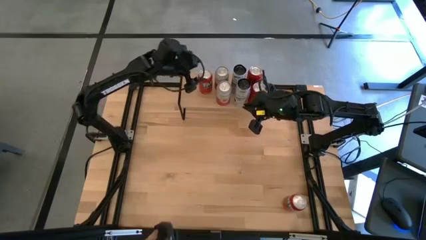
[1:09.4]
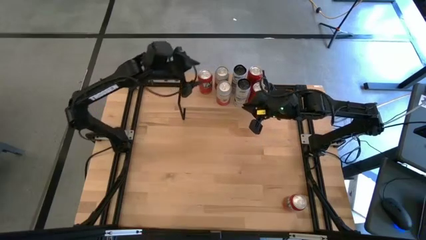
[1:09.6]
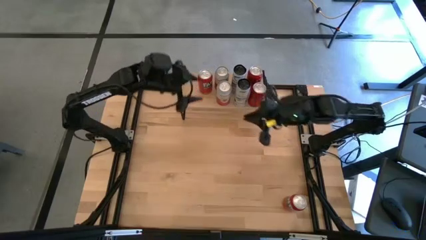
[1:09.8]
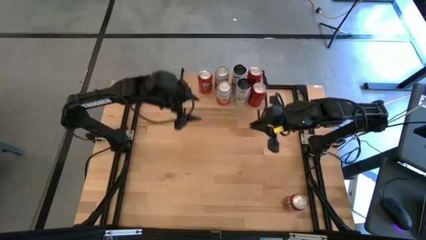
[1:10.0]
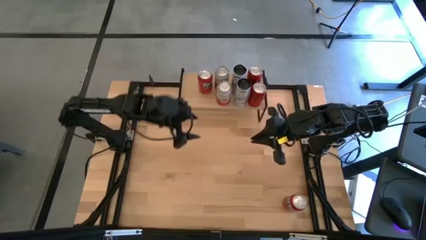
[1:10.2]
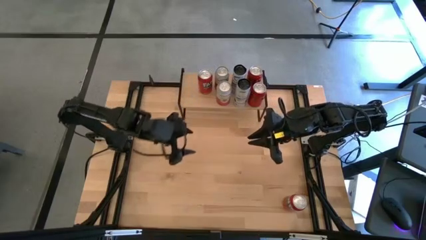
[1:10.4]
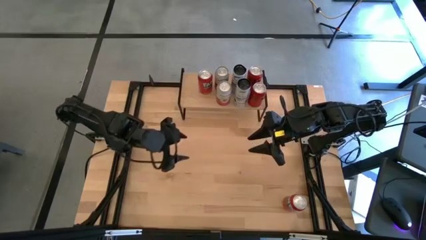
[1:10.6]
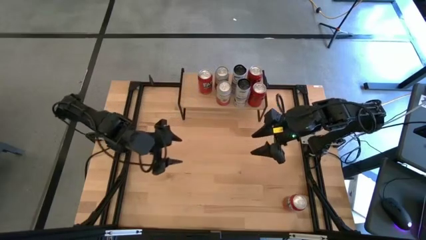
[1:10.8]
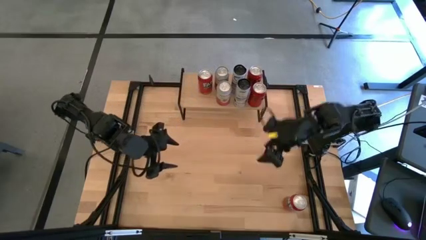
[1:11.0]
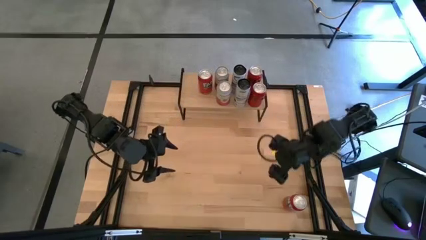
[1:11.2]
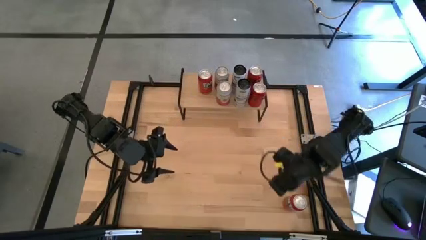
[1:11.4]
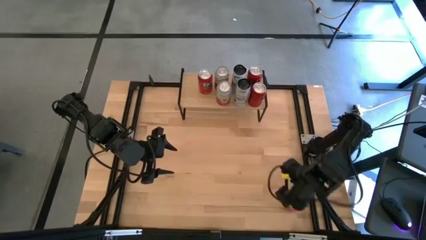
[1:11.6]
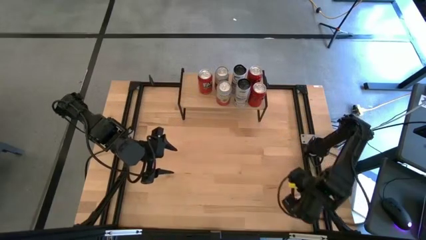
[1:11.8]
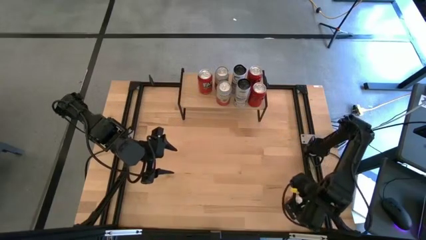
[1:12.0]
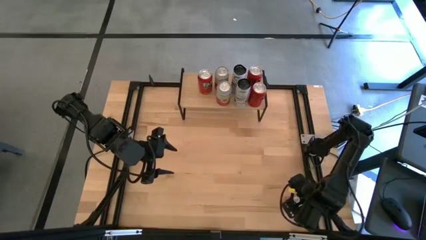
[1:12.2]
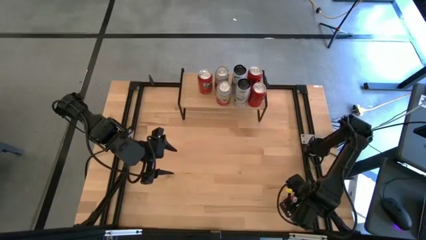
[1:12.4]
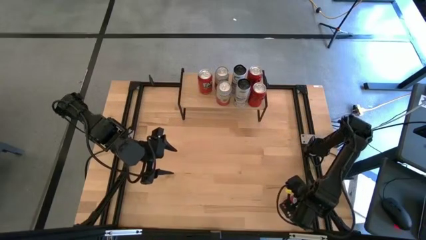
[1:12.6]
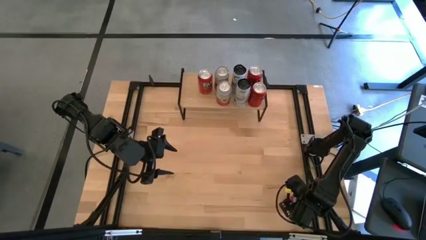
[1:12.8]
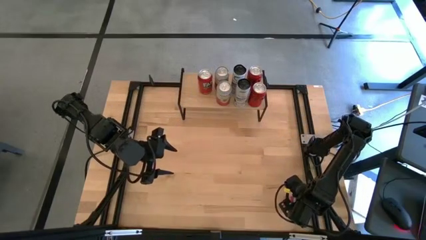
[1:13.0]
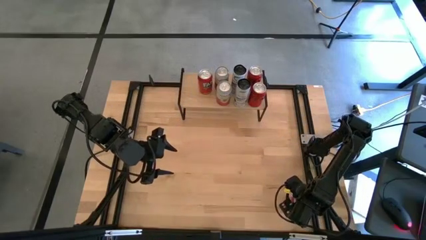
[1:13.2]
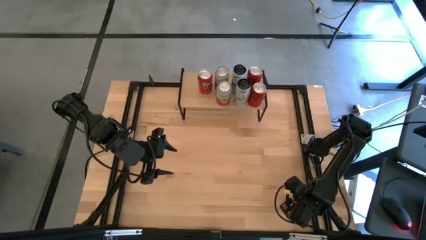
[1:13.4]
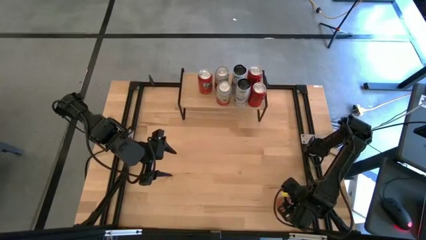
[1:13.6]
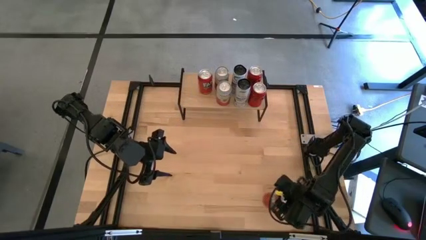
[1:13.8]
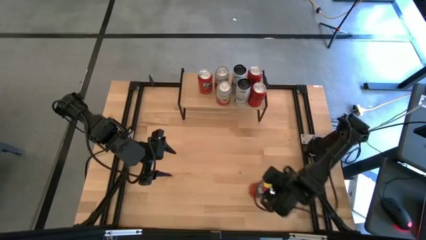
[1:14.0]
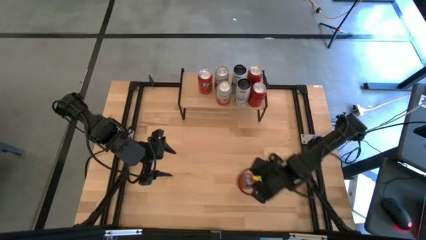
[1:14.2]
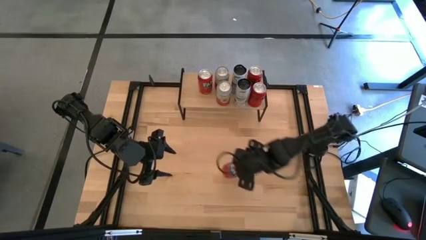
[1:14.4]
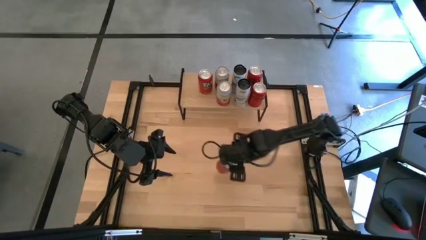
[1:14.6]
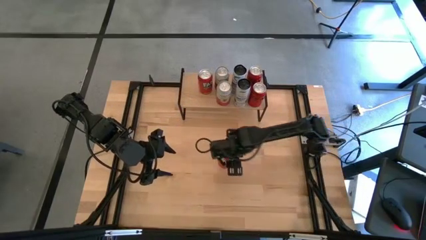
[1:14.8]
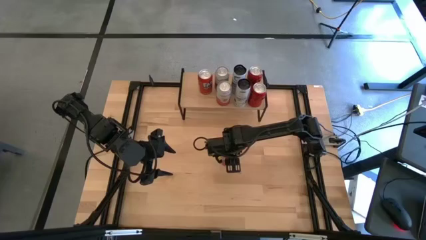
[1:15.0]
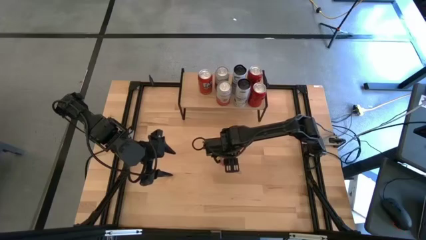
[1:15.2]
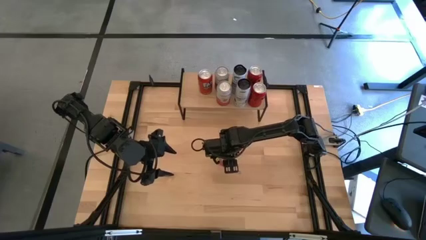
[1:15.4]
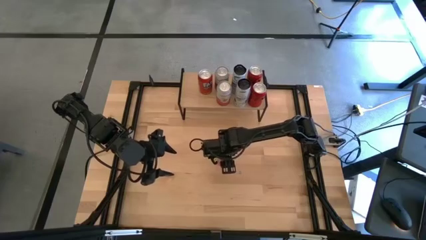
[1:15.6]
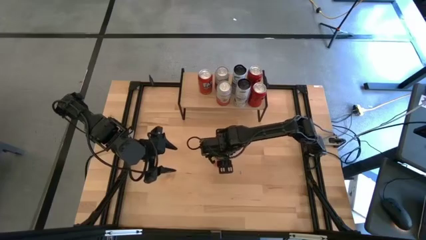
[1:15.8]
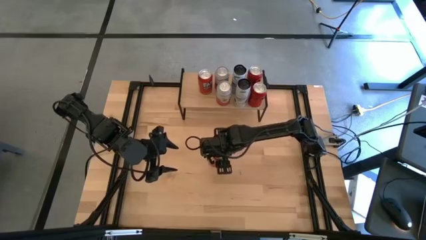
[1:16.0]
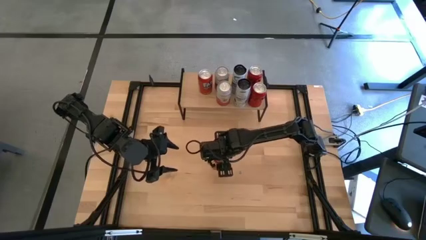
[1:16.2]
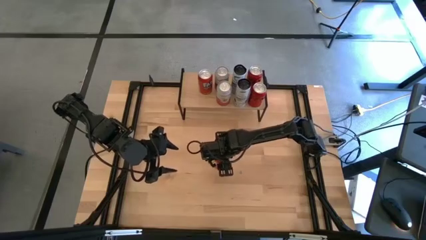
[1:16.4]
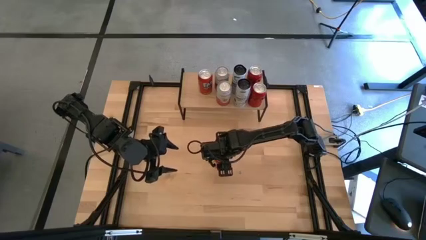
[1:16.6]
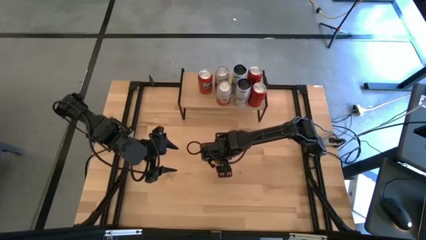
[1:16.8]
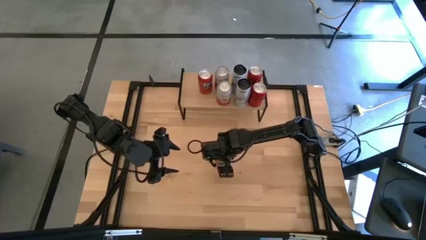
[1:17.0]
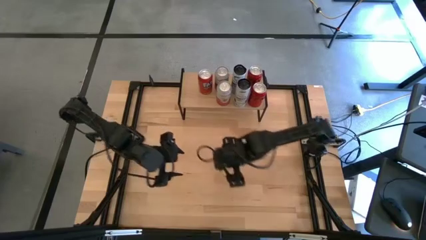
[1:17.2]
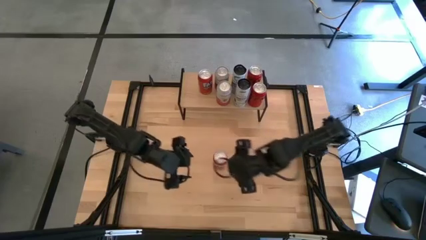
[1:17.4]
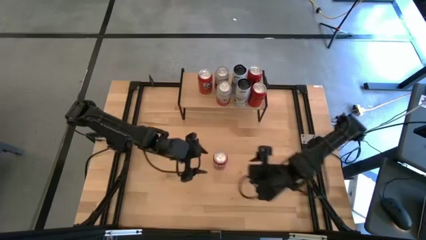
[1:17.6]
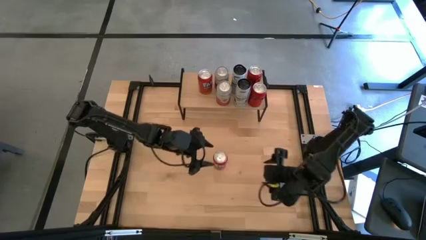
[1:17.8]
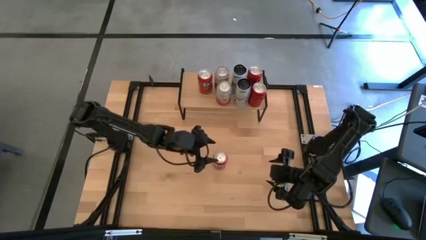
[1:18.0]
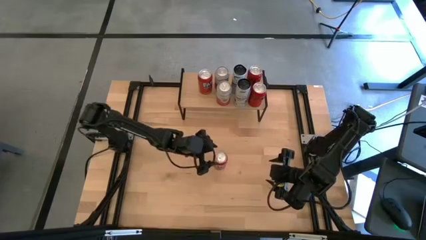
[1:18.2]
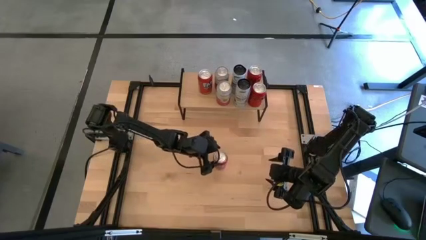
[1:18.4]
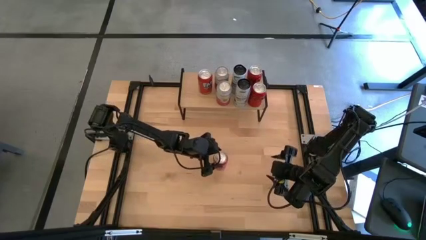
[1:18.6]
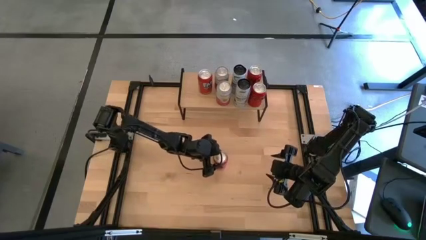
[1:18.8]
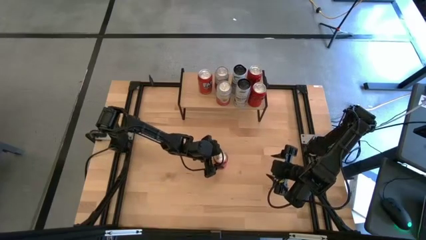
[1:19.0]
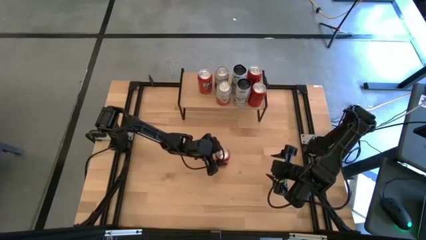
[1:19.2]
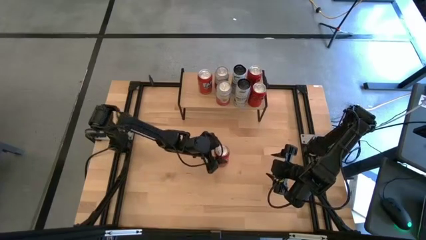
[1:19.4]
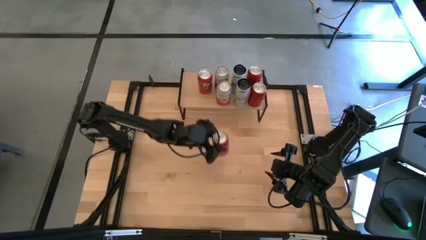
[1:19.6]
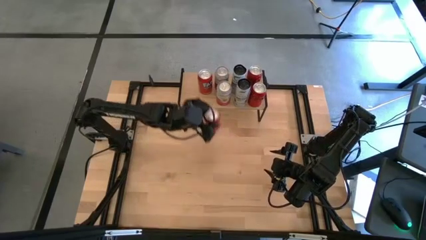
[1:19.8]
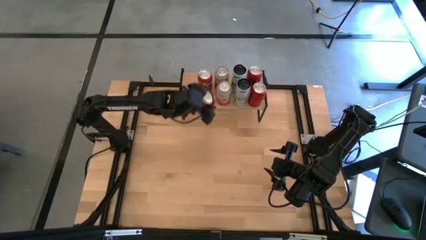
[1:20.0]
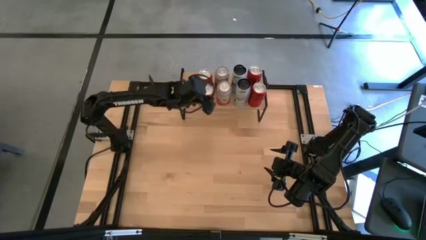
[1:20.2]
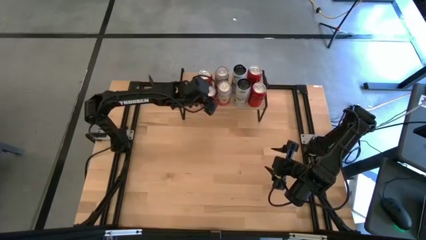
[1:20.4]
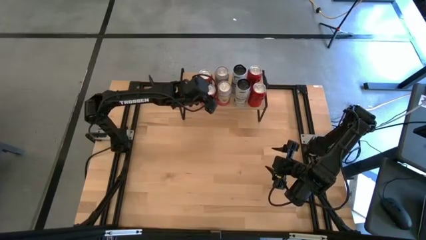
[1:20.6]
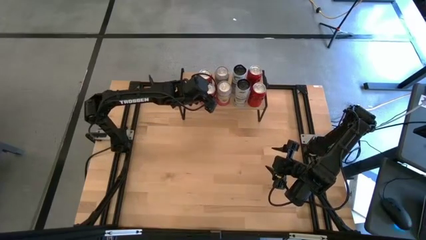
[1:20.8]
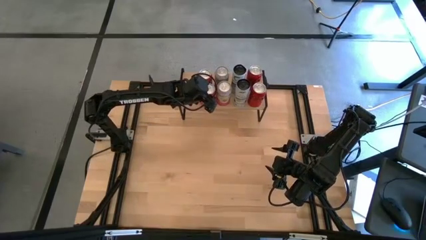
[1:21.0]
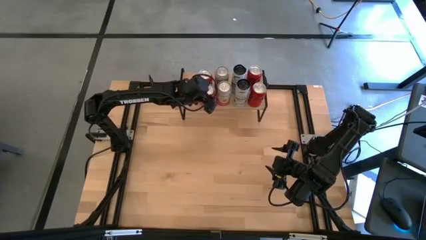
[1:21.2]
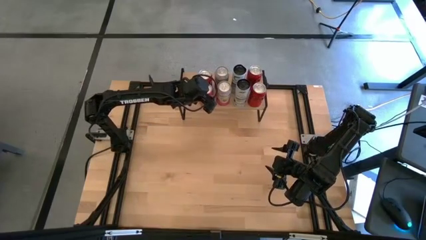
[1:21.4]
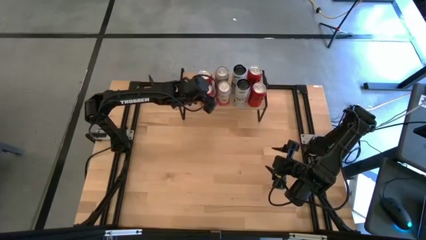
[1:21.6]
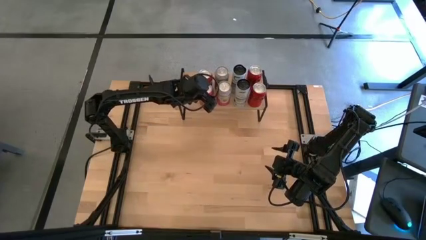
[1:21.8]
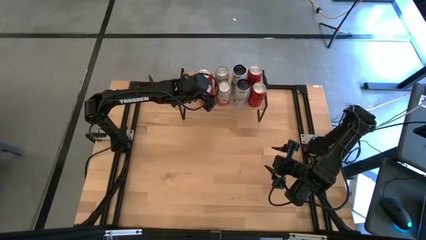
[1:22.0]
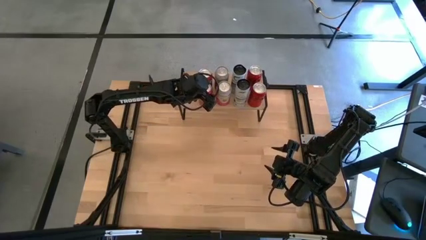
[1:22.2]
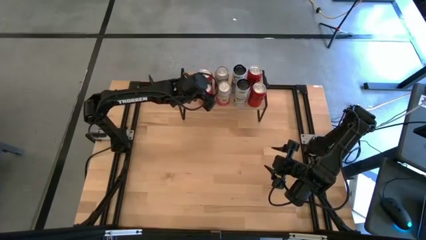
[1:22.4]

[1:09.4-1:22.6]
Task: Place canned beverage on shelf
Put the orange soda can aligned with the other orange soda can on the shelf

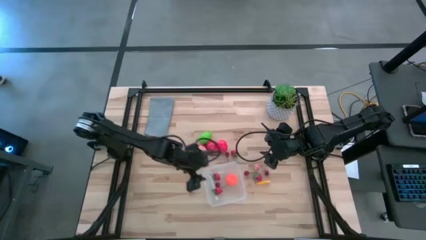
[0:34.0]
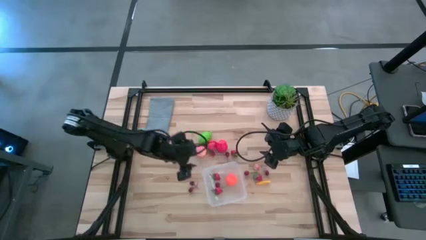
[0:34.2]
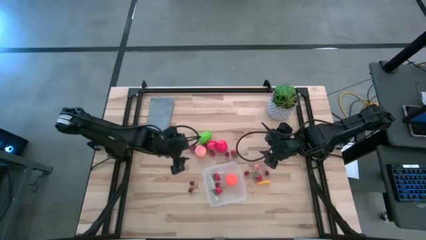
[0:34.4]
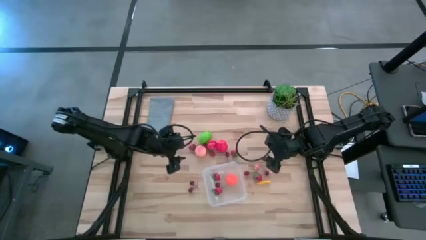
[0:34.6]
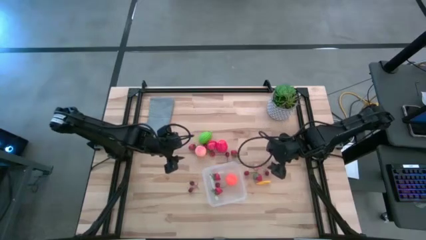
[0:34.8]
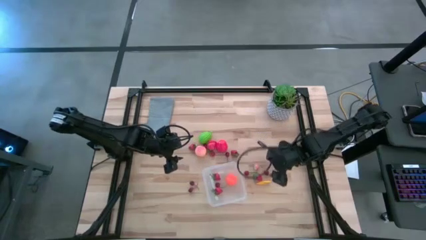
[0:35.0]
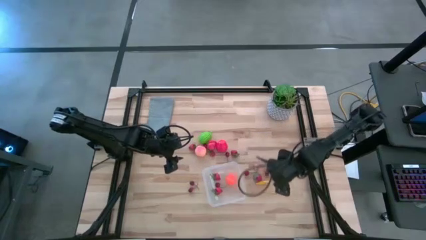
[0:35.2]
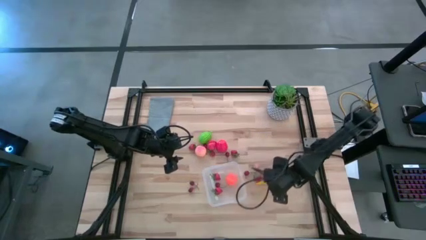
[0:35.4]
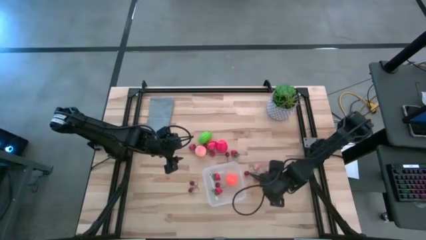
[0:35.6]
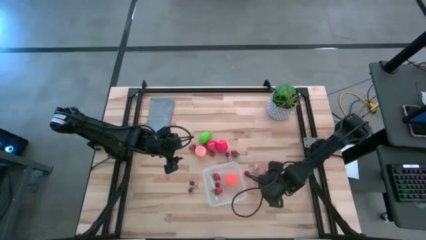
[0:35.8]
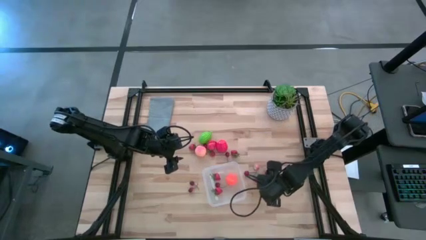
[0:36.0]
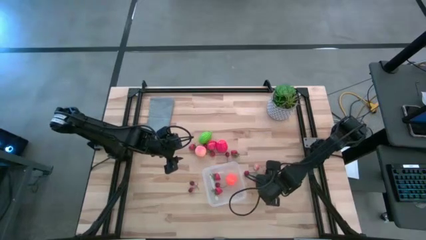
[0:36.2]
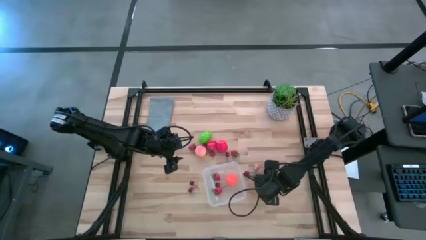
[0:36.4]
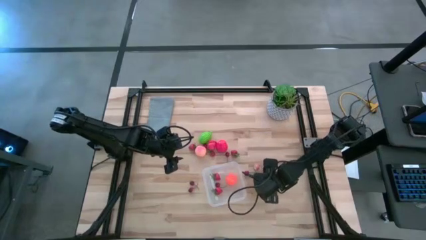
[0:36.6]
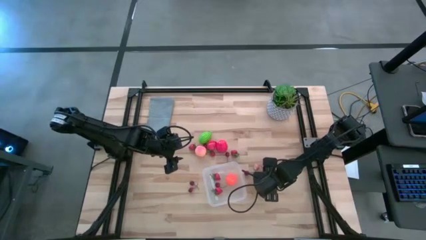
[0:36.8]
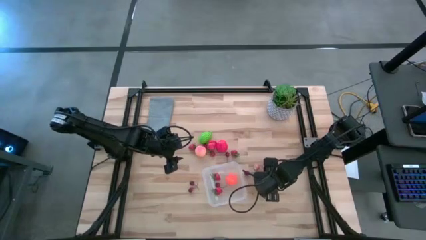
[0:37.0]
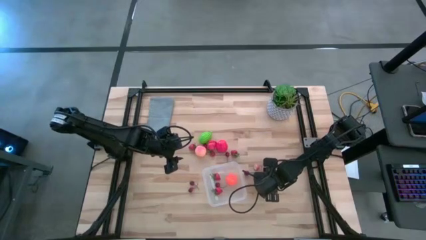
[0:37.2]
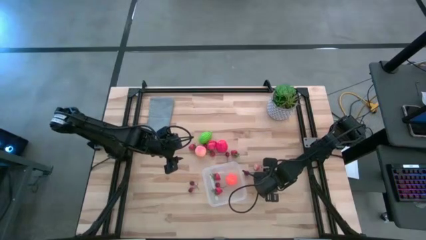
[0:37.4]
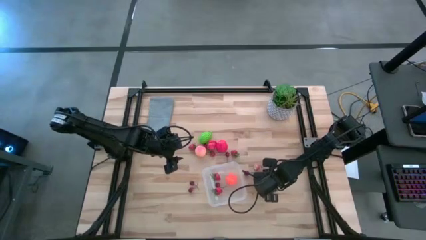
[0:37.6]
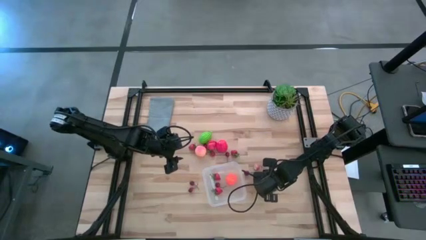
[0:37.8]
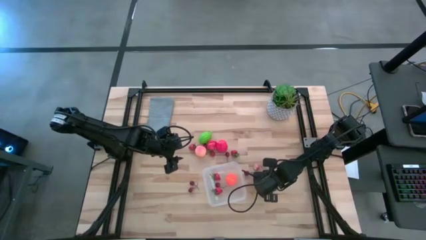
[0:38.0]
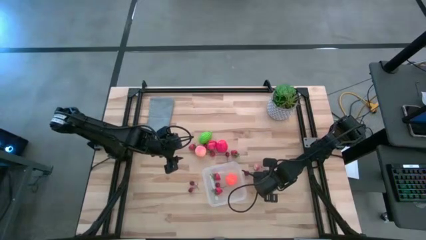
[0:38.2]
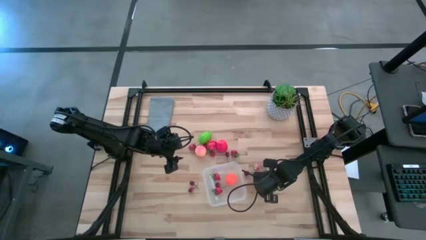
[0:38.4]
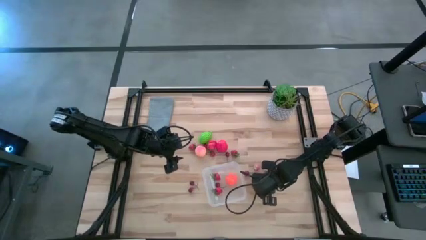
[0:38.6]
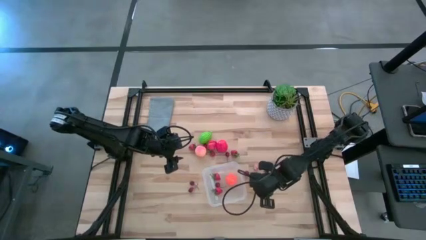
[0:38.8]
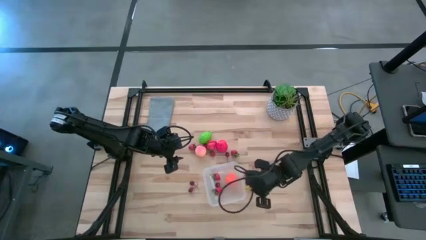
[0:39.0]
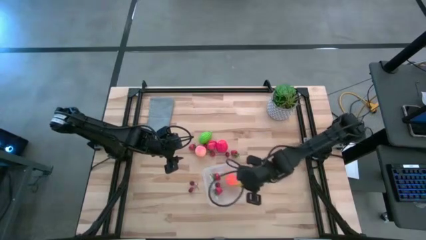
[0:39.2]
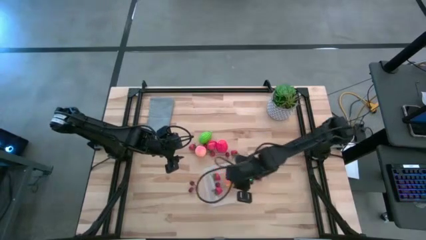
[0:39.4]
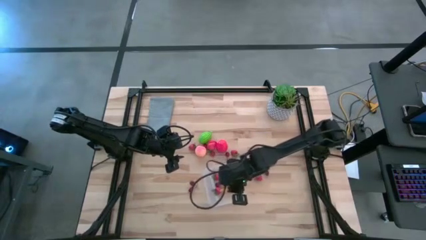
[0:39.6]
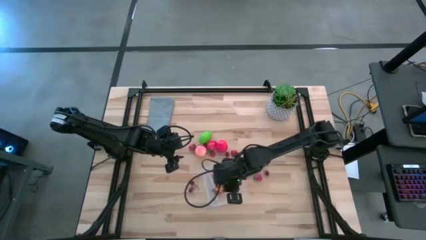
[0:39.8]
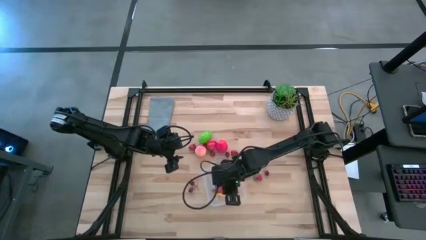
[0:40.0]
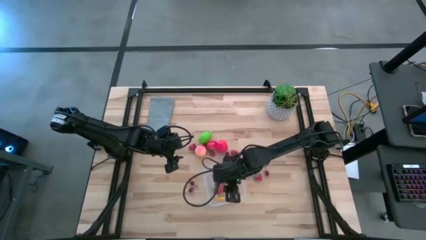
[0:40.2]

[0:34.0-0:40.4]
Task: Pick and placing Produce into tupperware
Put the yellow corn into the transparent bin
